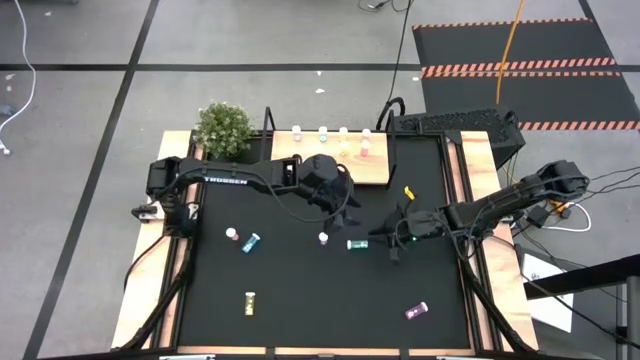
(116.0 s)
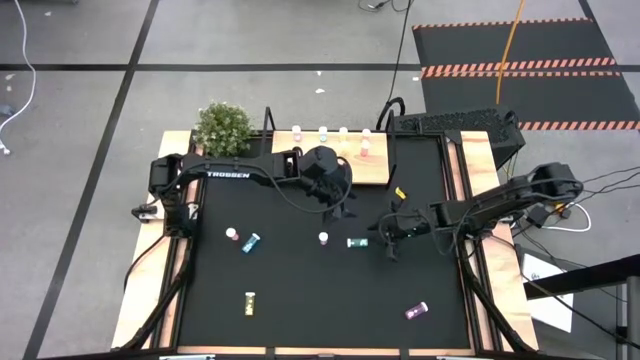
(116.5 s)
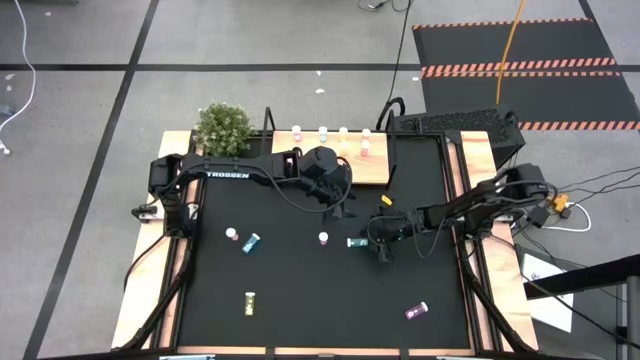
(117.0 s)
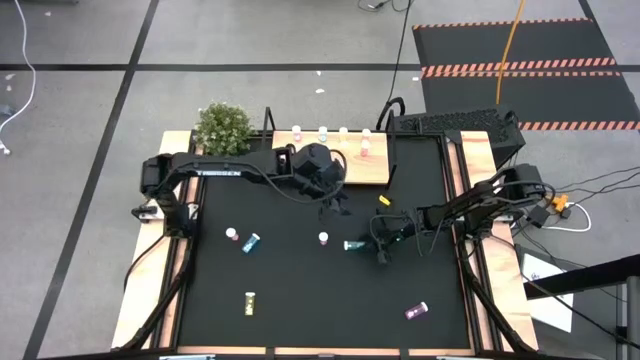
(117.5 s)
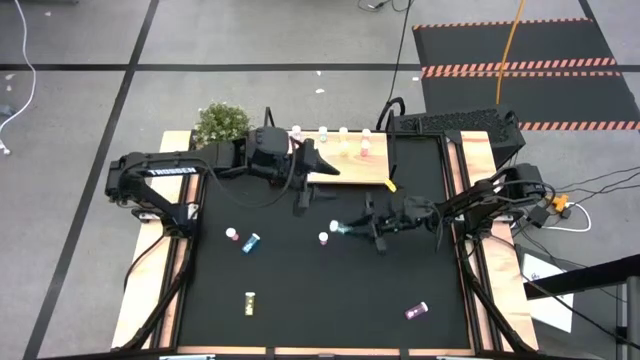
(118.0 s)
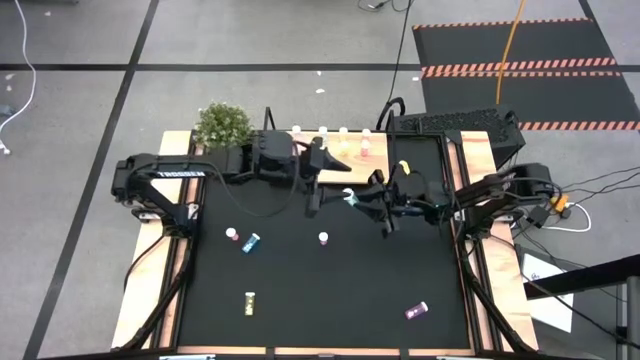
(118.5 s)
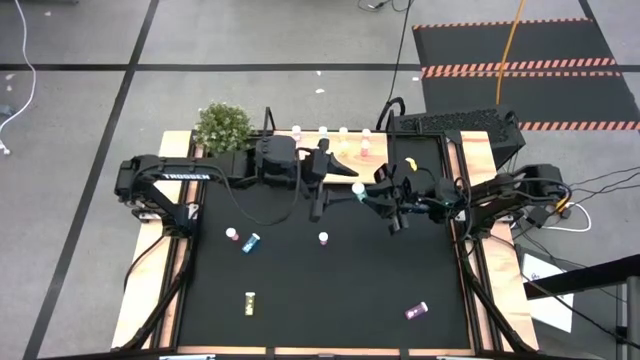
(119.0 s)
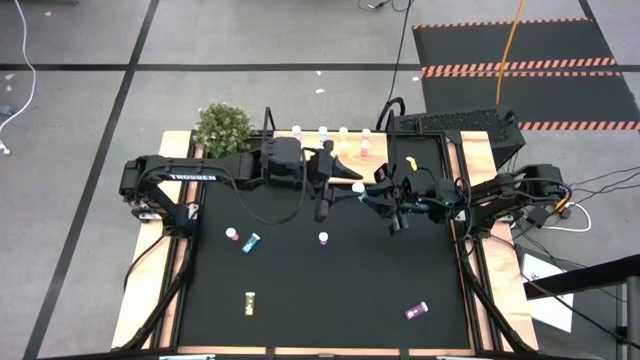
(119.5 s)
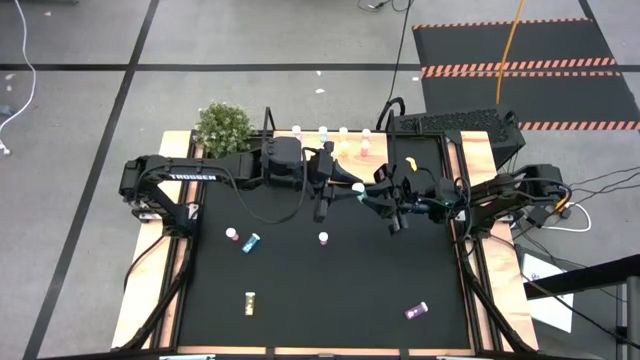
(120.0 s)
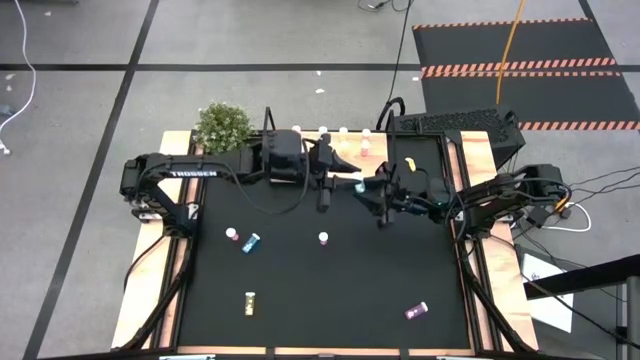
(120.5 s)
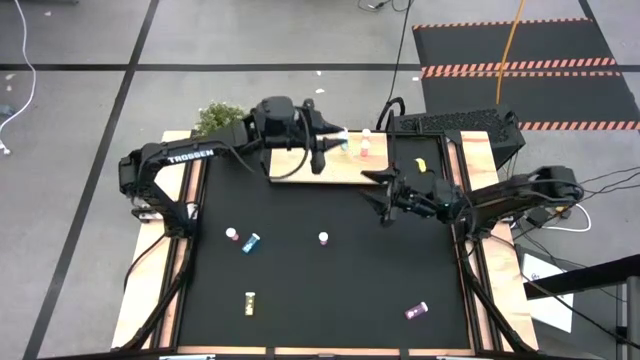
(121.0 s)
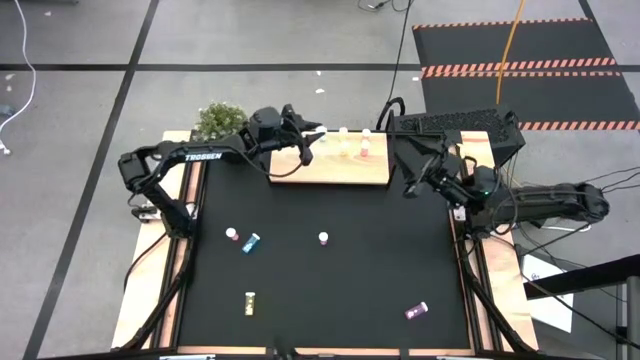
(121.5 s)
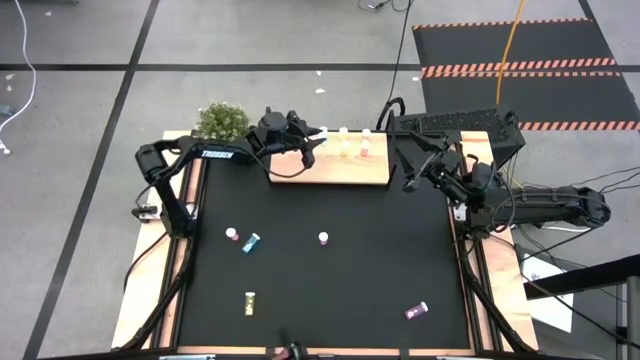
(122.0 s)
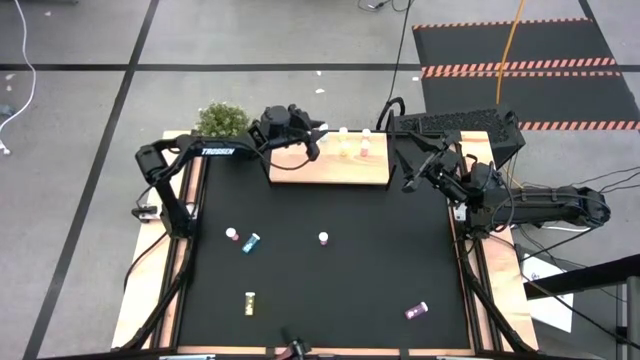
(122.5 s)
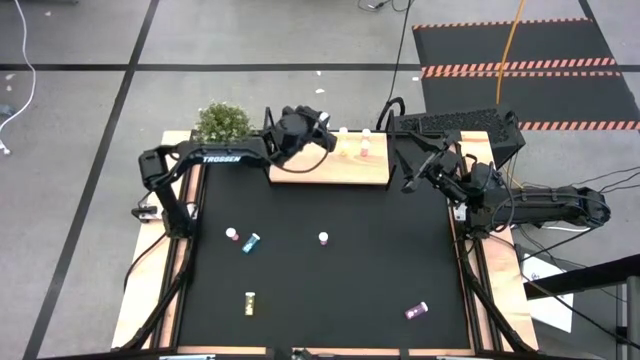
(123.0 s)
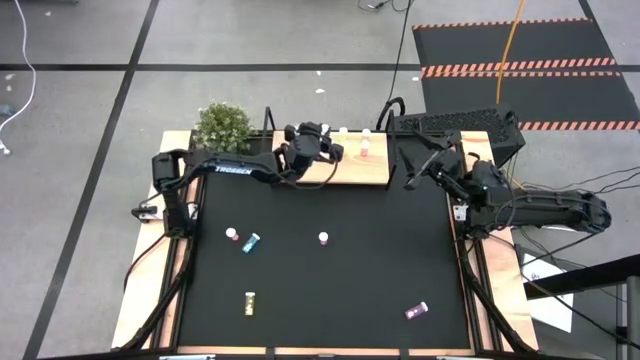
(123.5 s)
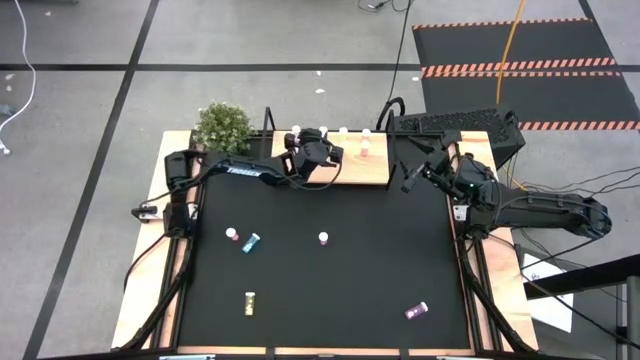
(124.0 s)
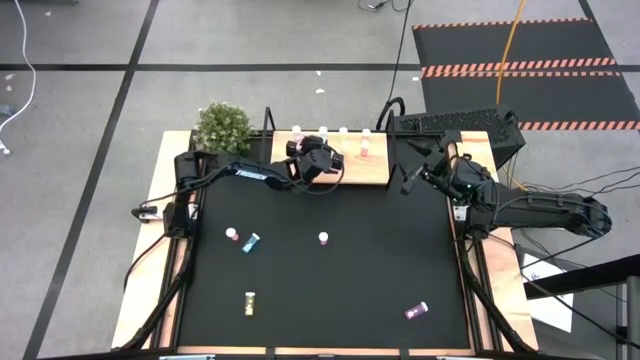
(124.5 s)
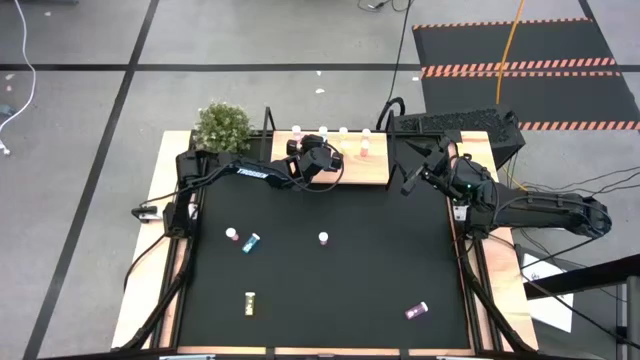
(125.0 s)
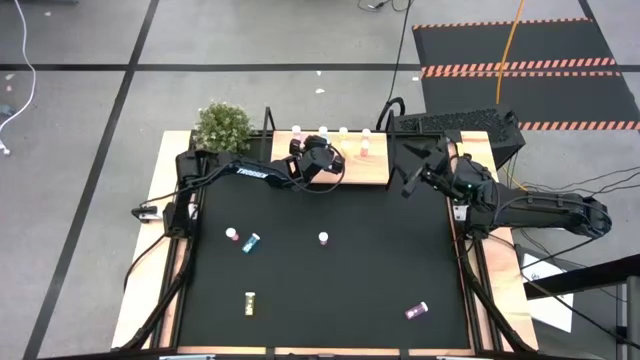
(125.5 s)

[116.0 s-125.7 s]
Task: Pick and place medicine bottles onto shelf by color
Put the right blue pill bottle on the shelf aligned with the other blue pill bottle

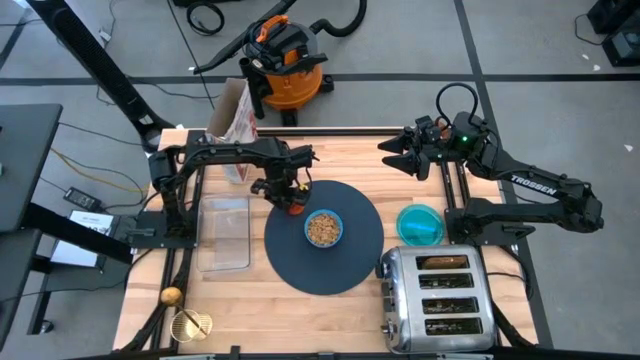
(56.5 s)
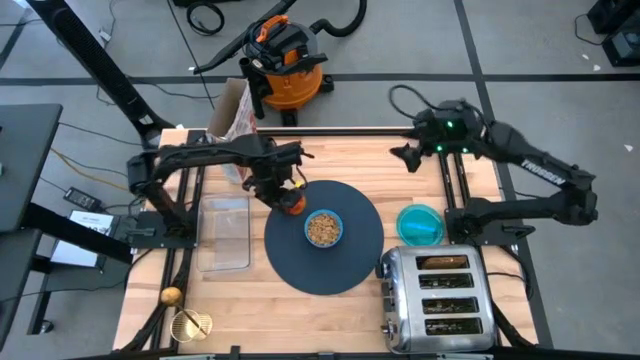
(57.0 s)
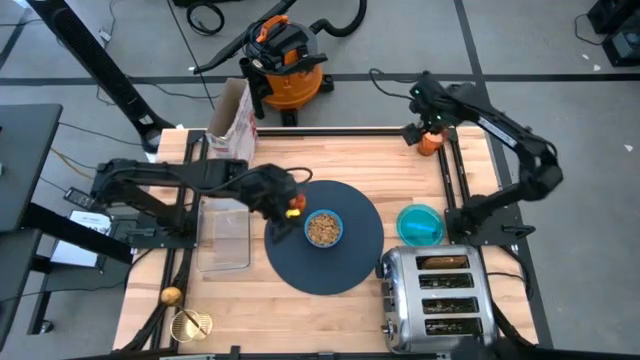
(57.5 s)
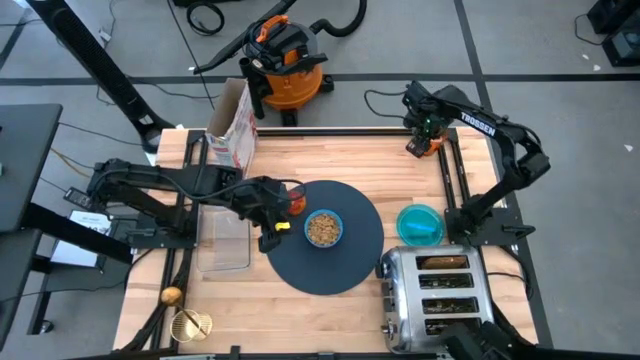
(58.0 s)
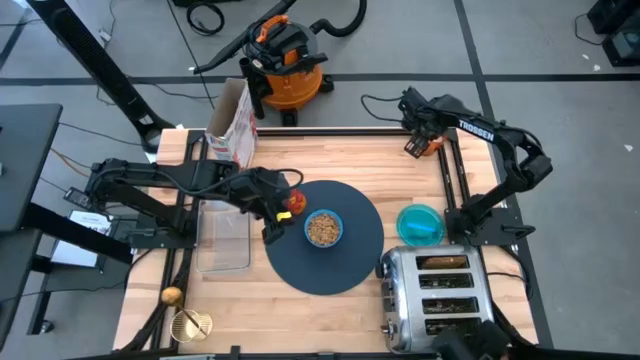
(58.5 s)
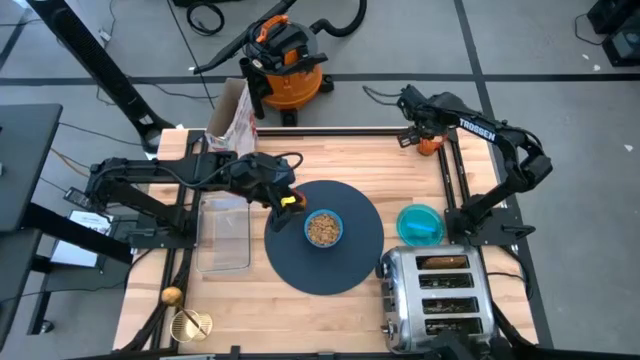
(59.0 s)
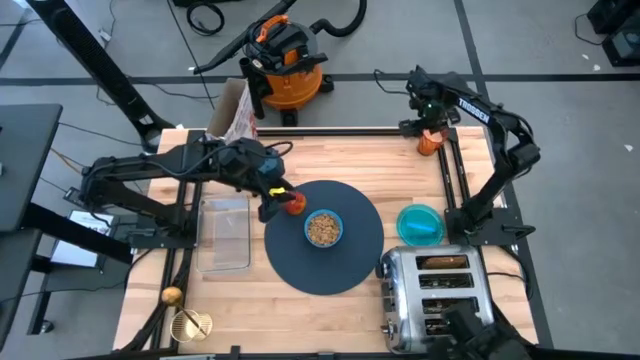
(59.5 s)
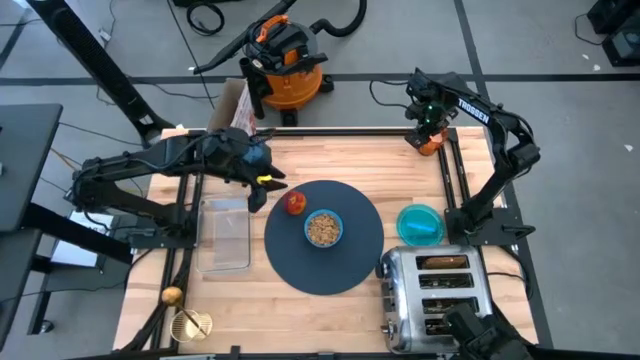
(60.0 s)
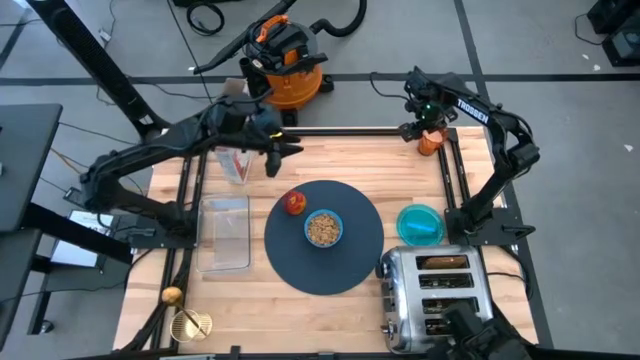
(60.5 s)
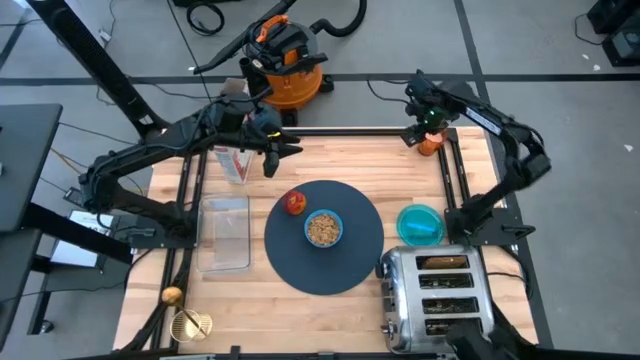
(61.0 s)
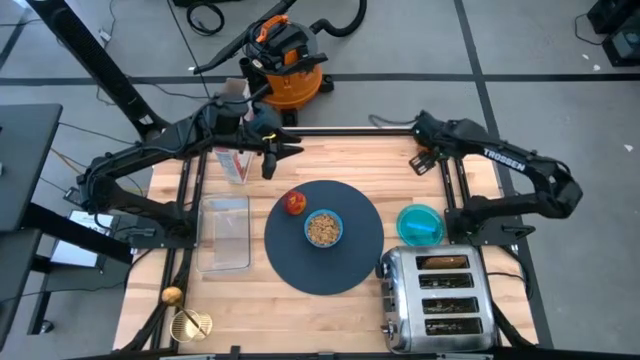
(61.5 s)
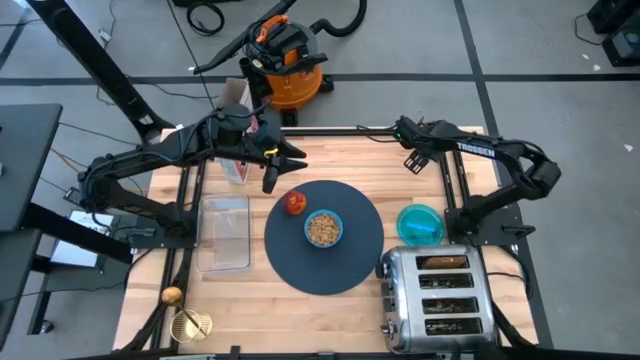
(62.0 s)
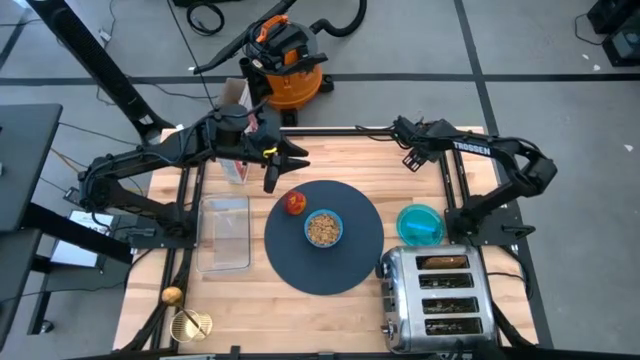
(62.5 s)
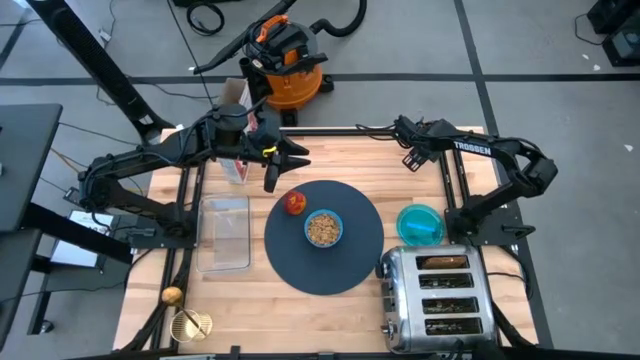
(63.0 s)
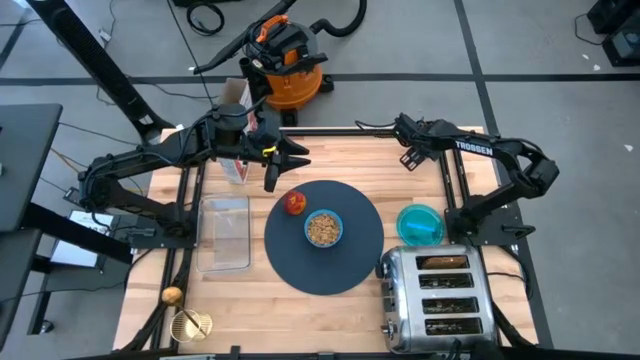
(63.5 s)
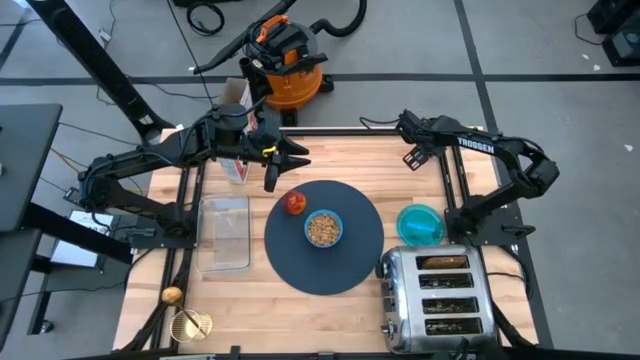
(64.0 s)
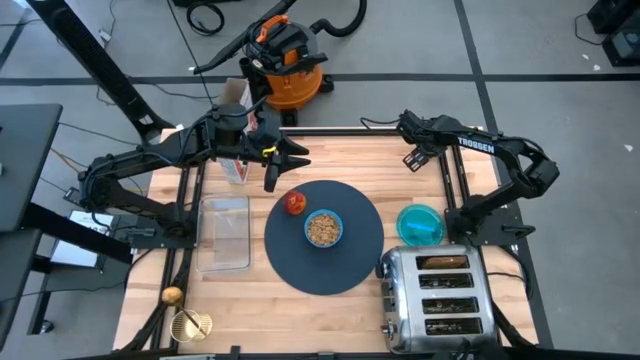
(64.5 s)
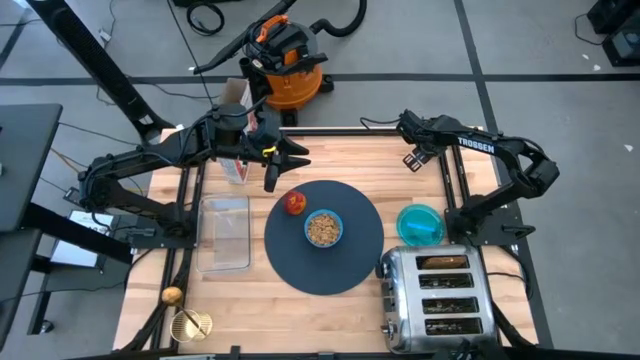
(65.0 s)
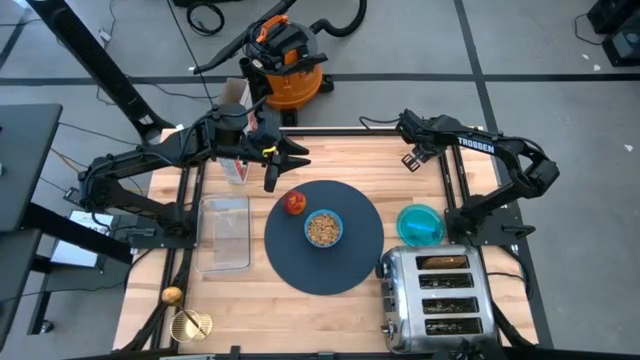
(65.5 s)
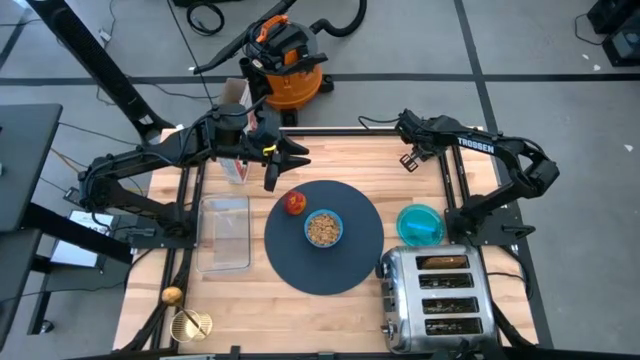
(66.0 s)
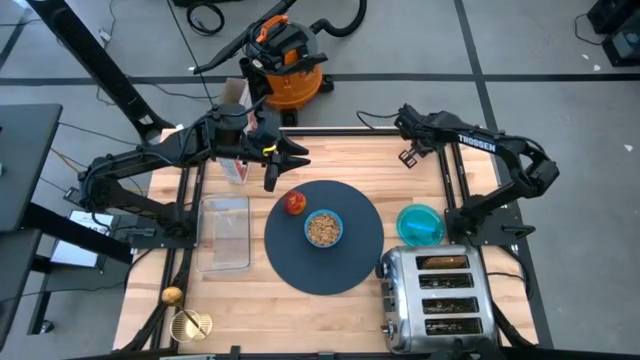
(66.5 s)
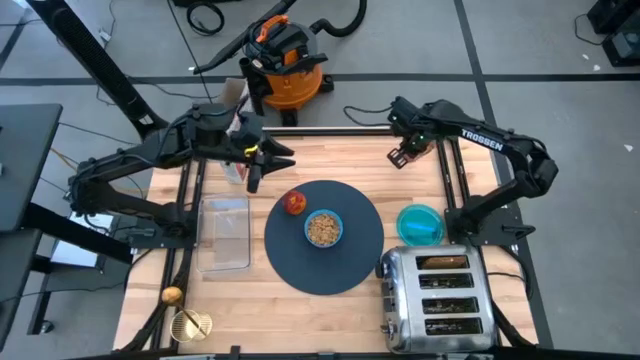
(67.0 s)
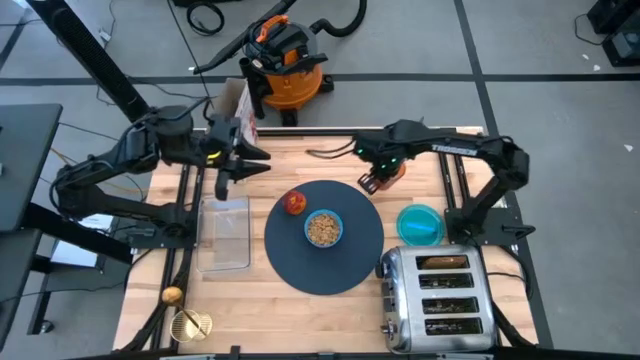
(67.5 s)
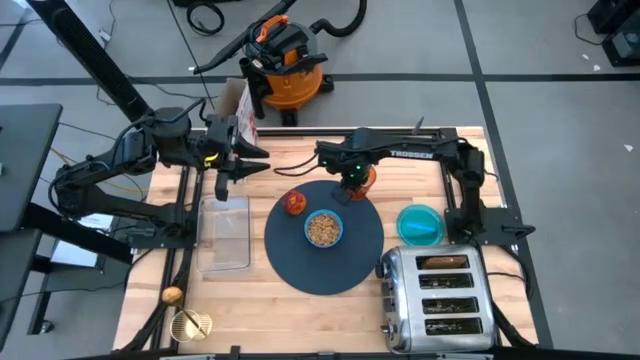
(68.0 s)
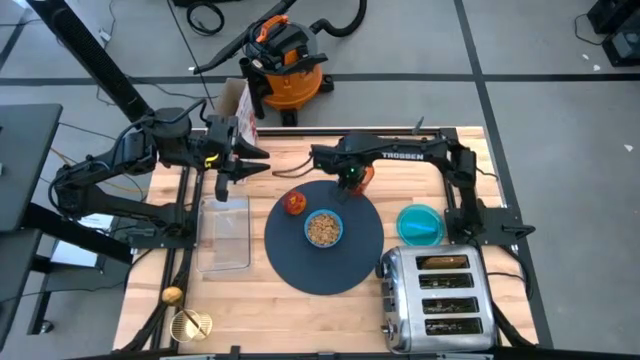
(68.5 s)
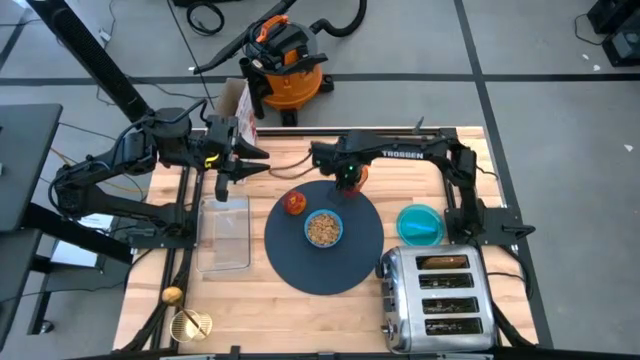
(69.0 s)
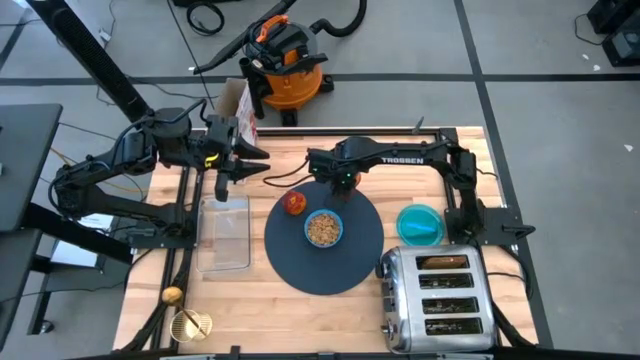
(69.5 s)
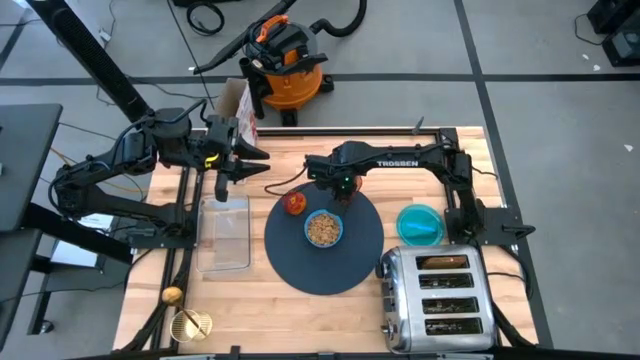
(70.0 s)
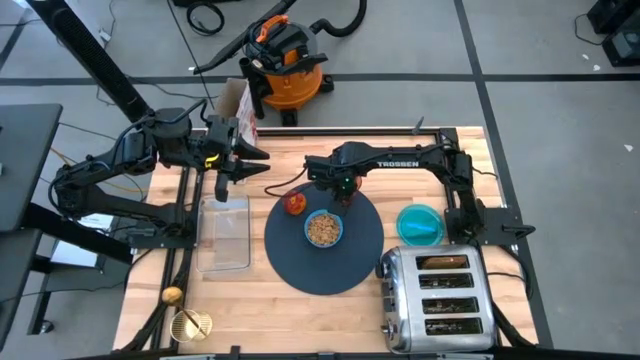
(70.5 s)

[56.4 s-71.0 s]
Task: Arrange a breakfast setting
Put the brown glass on the tablemat to the top right of the blue bowl
